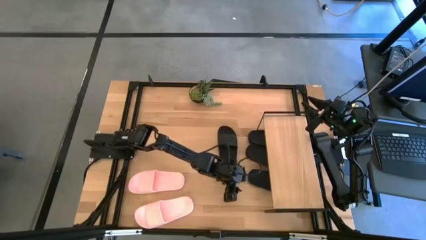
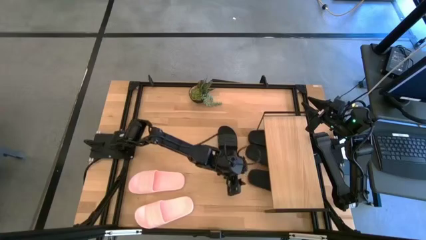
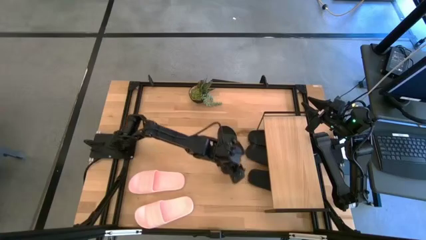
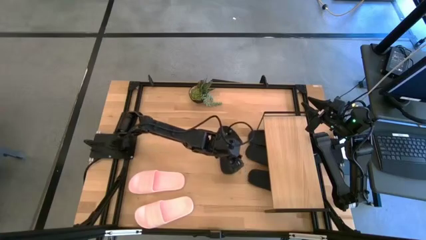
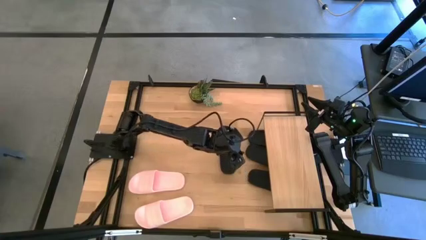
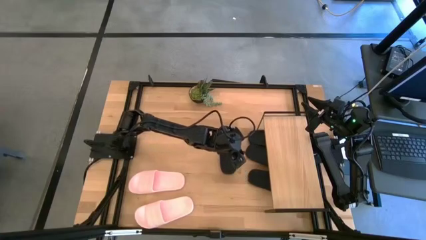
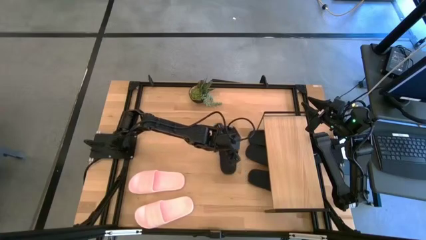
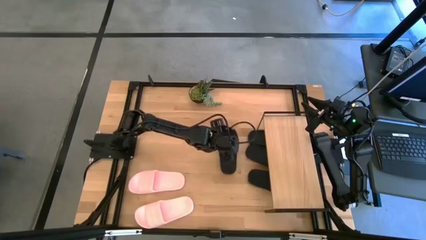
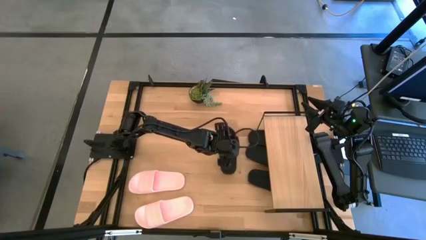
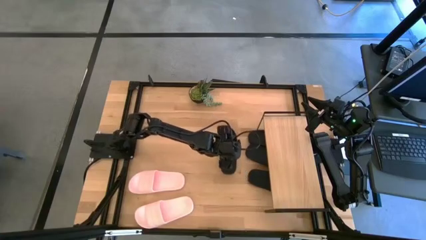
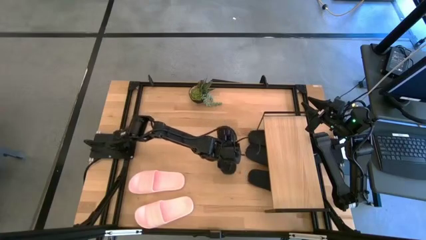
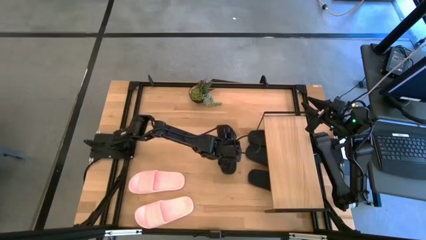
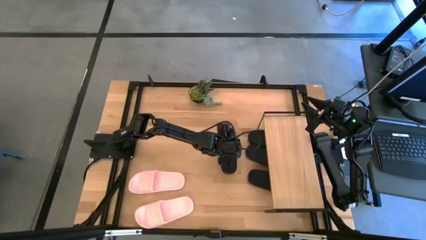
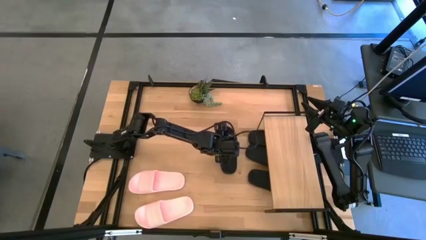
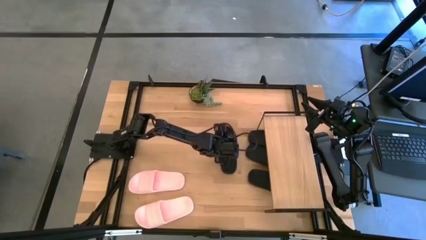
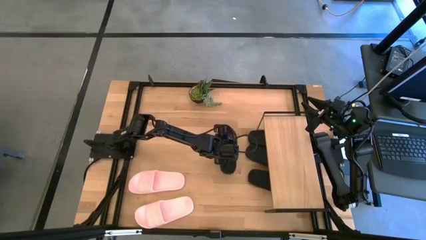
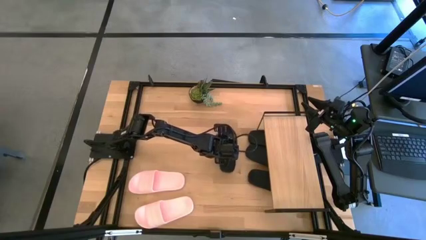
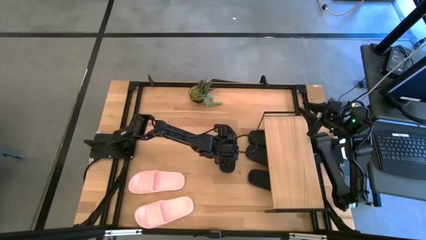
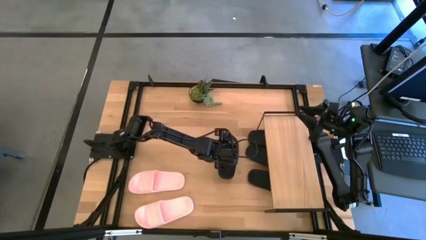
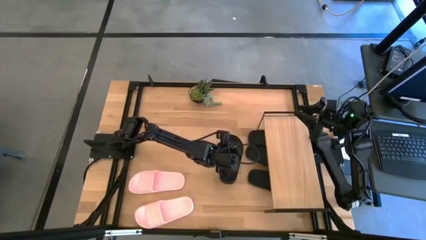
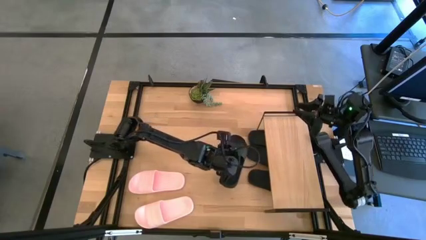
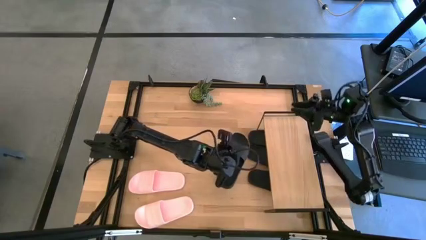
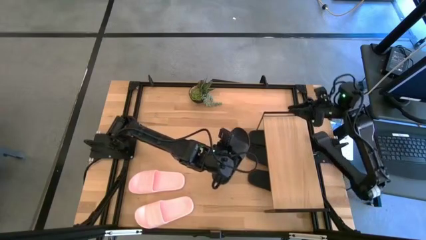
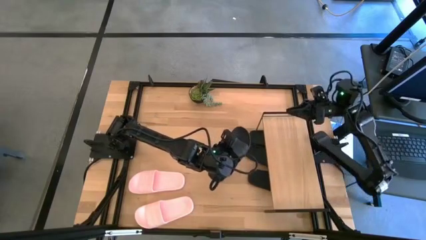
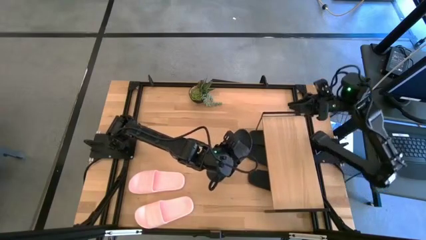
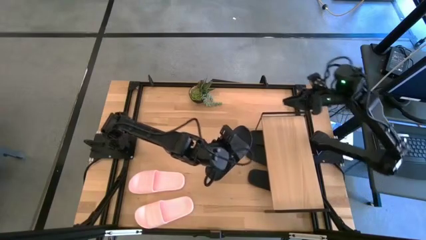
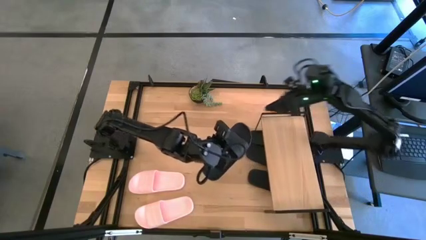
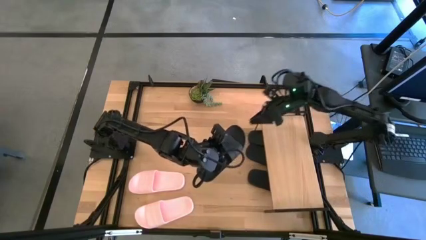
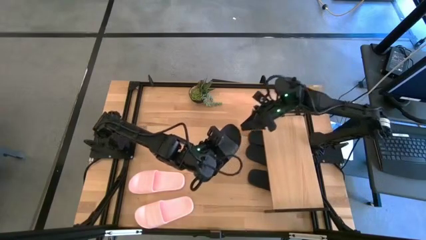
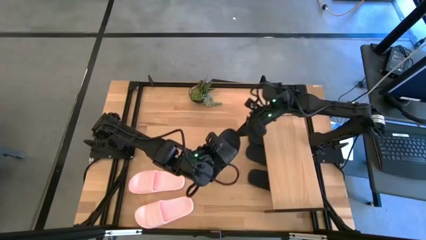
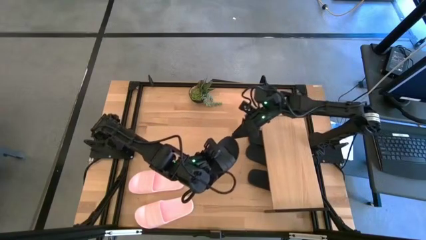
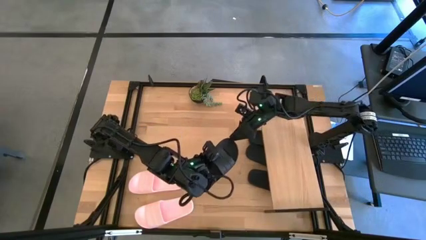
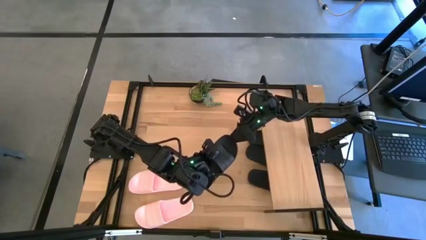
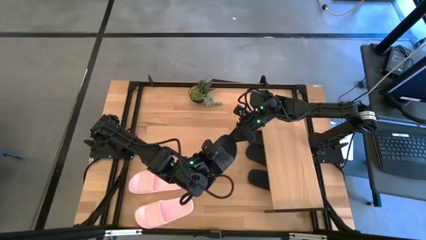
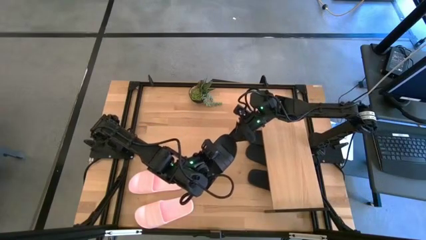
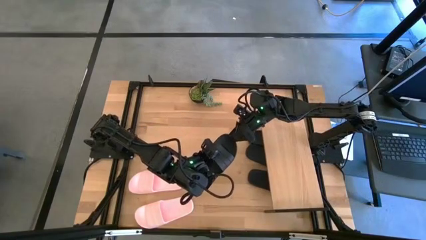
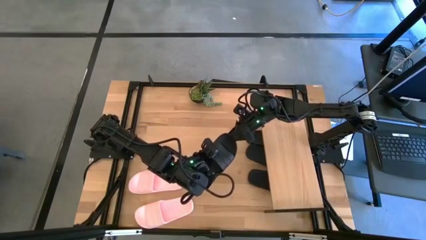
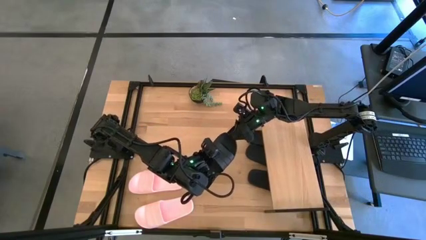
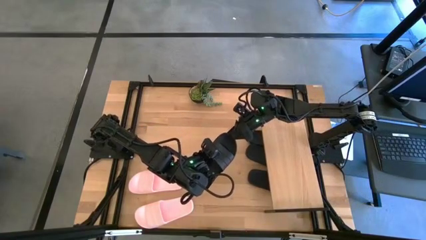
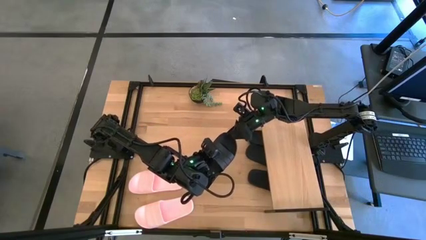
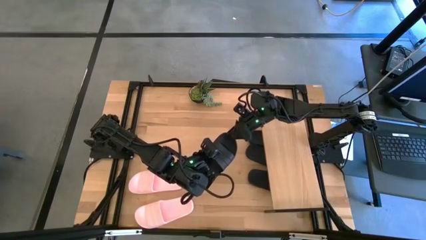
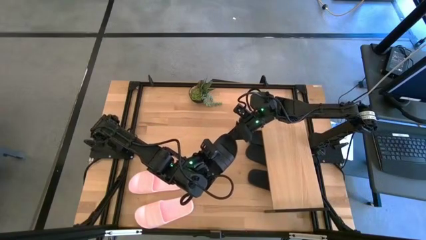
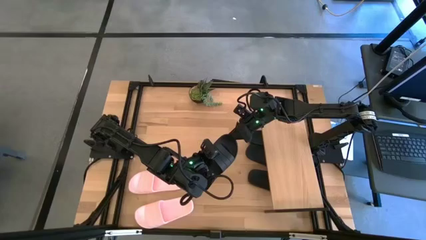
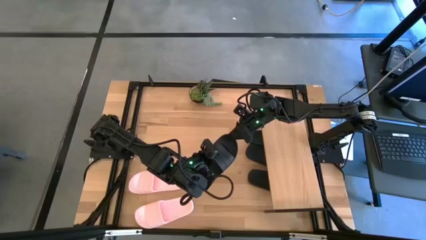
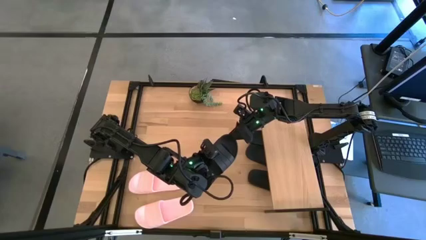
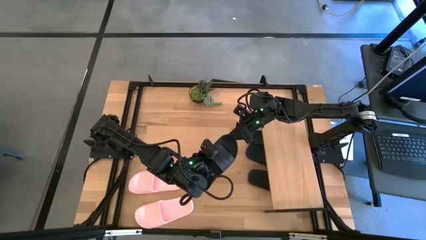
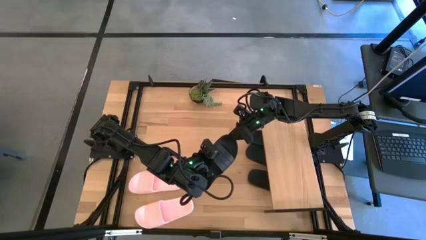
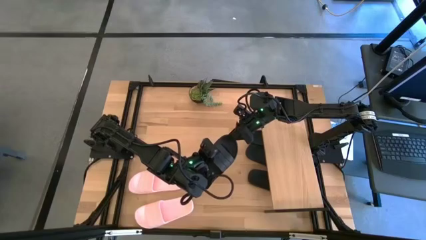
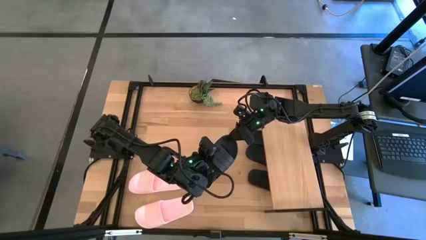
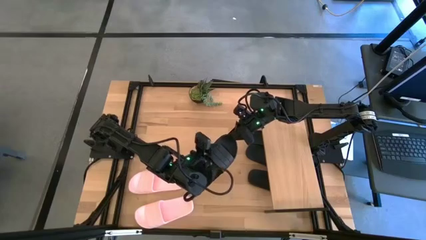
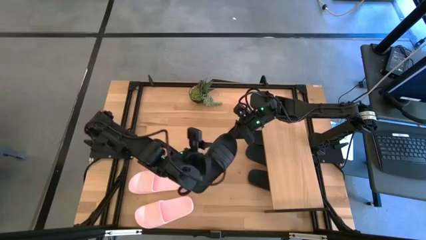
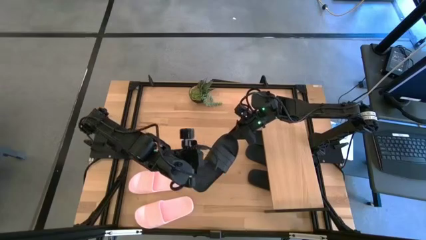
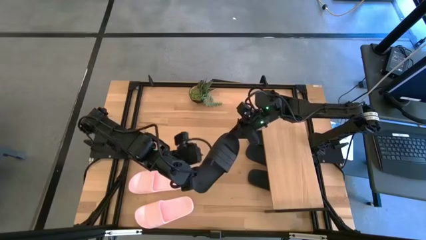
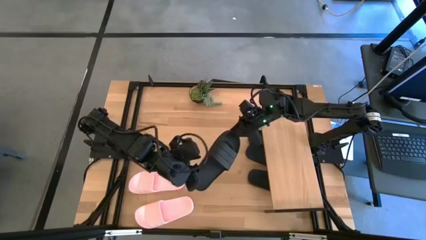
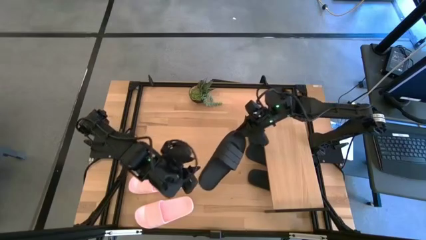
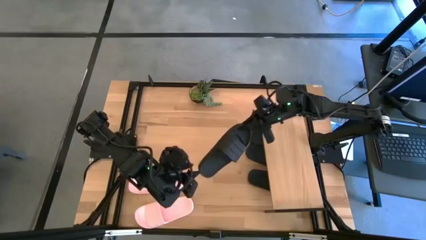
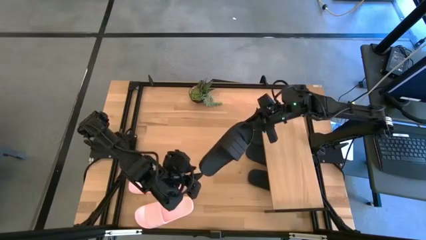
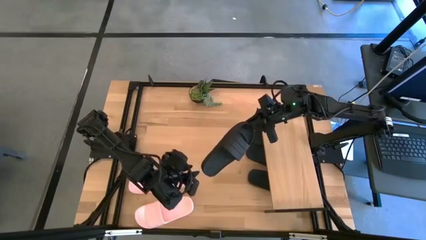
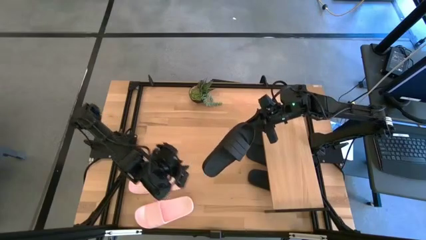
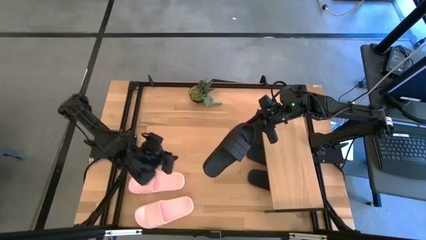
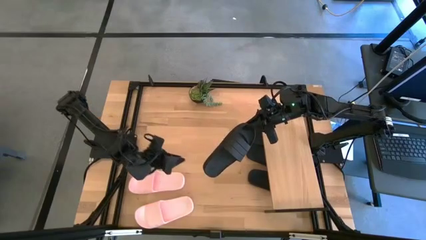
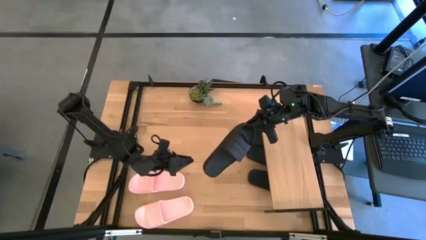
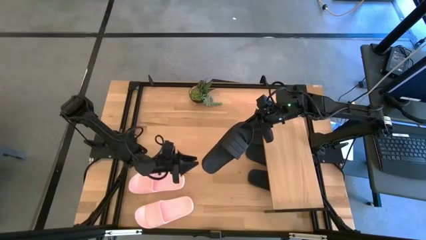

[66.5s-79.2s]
Task: Pick and place slides into the shelf
Put the black slide under the shelf
